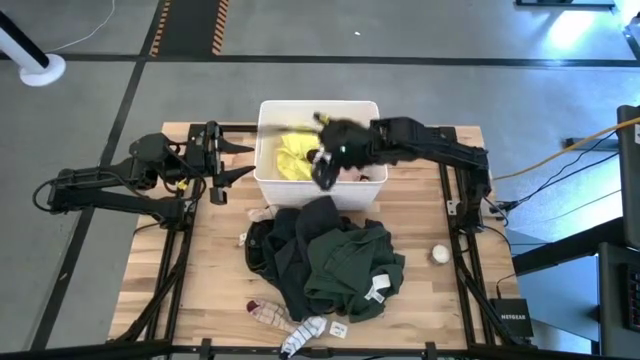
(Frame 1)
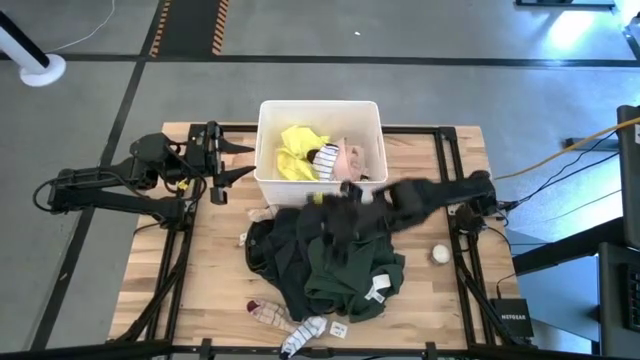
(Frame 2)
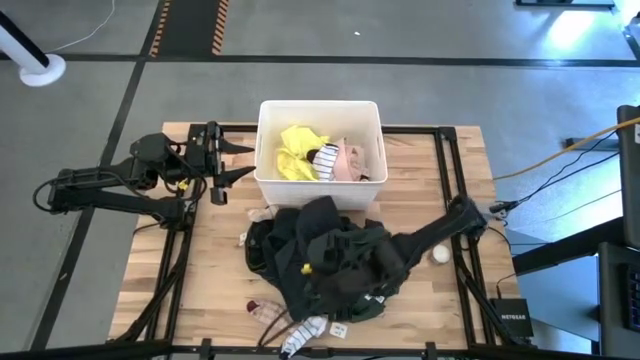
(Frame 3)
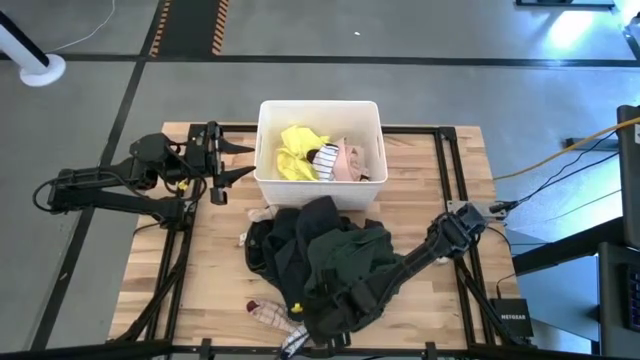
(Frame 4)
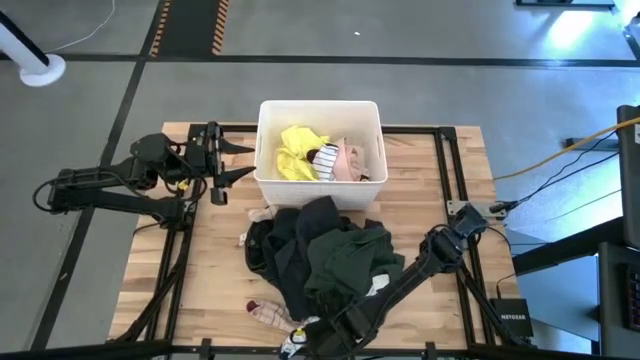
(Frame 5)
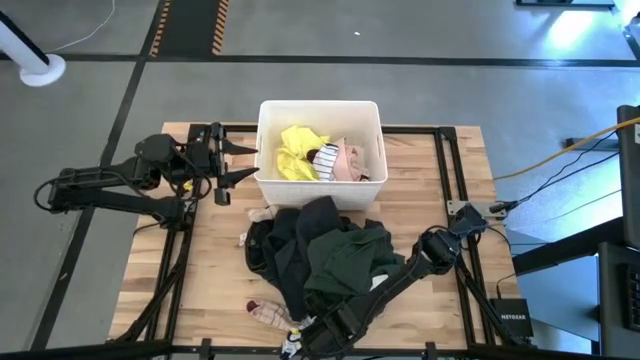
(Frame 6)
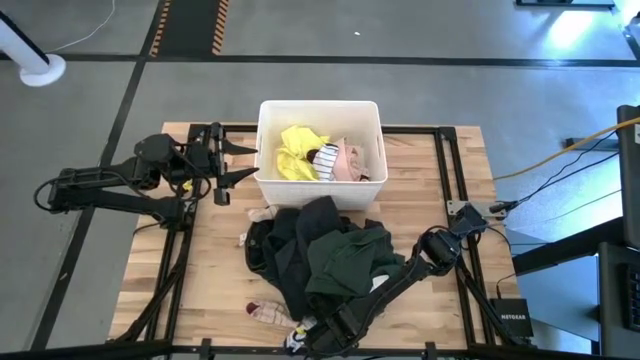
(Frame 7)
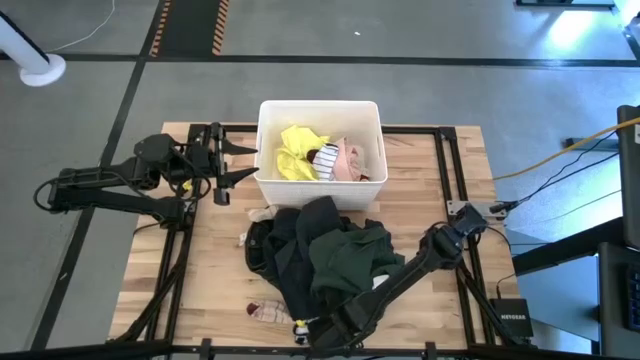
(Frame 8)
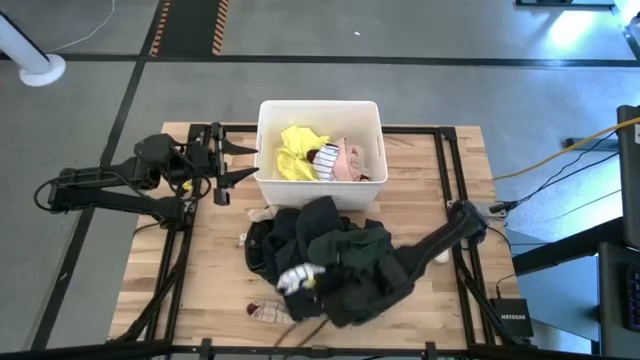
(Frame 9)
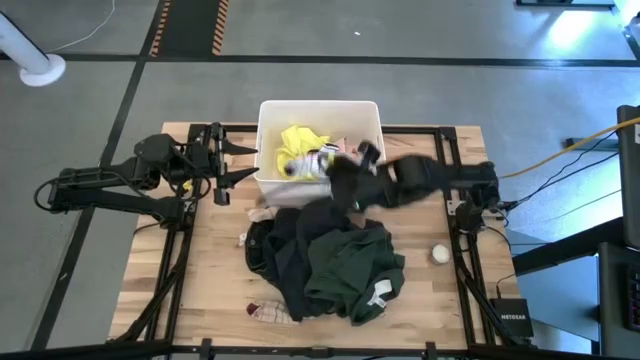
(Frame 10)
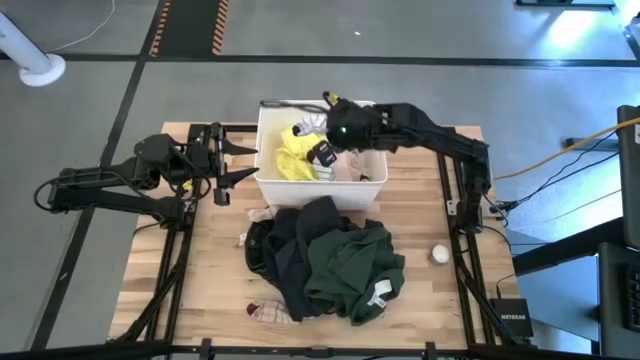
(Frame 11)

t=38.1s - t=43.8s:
Task: Sort clothes
Put the white sock into the white bin

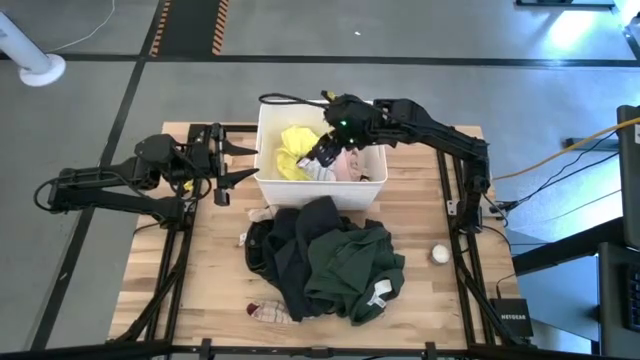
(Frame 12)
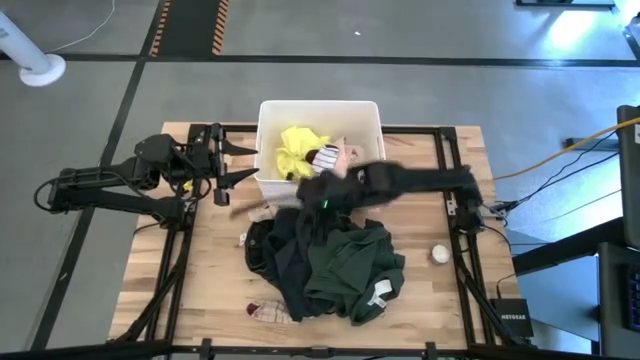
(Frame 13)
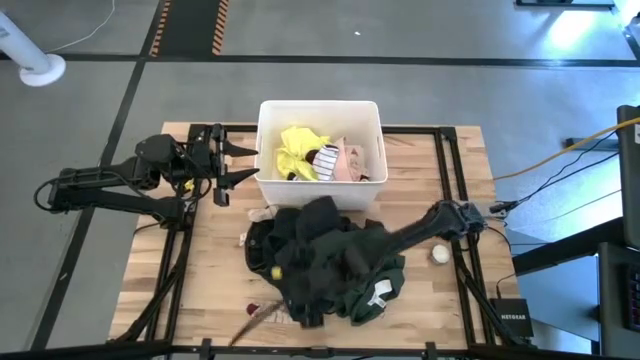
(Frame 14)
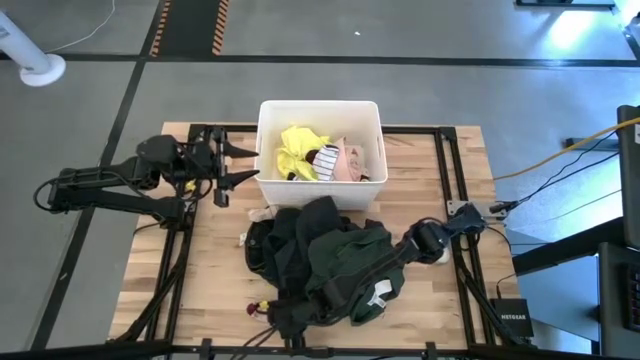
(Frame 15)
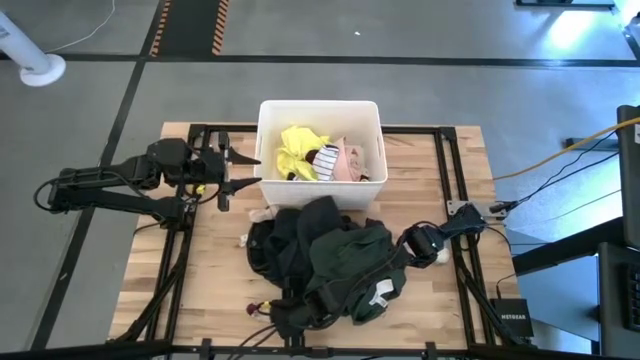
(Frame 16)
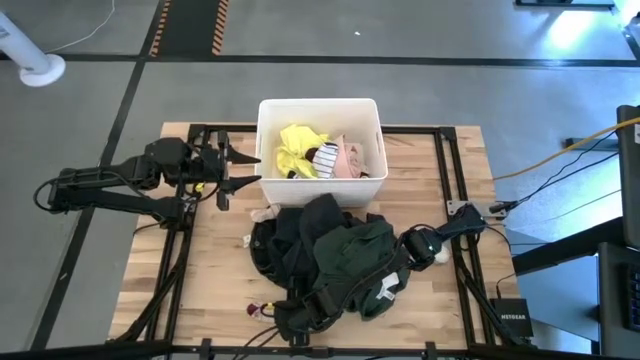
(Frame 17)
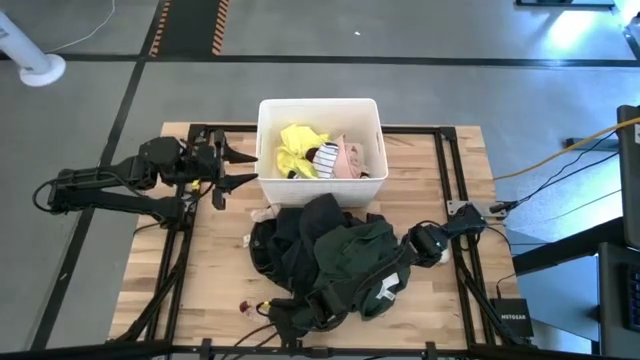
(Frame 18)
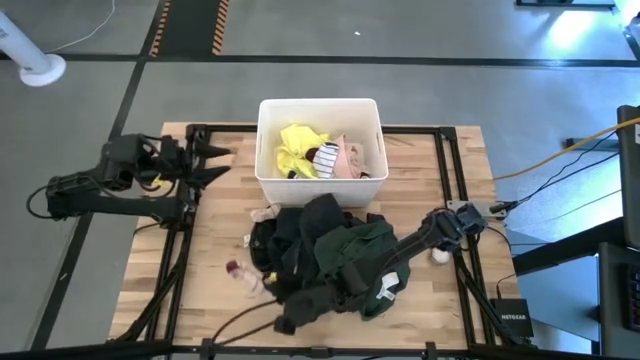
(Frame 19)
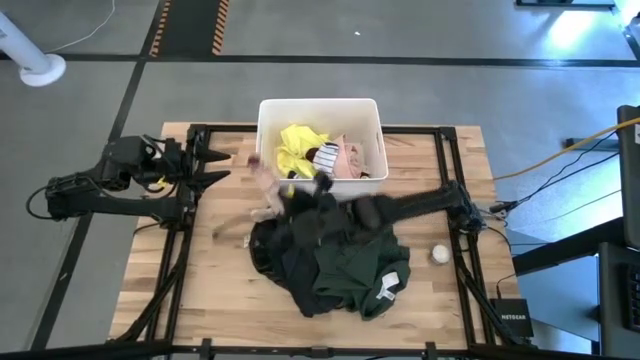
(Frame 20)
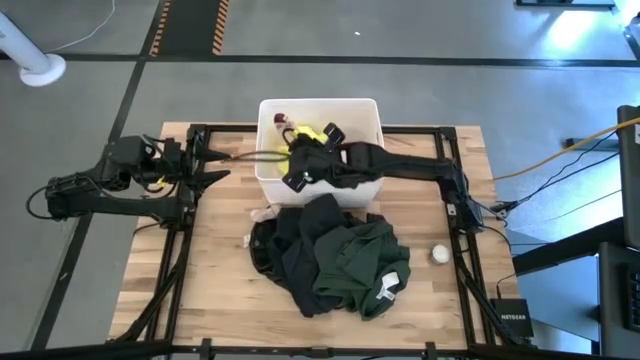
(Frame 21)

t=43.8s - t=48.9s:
Put the bottom red sock into the white bin

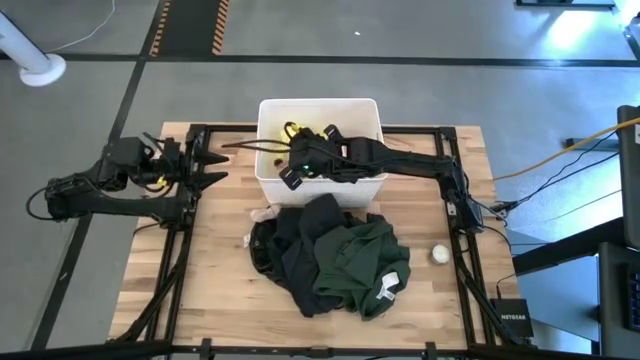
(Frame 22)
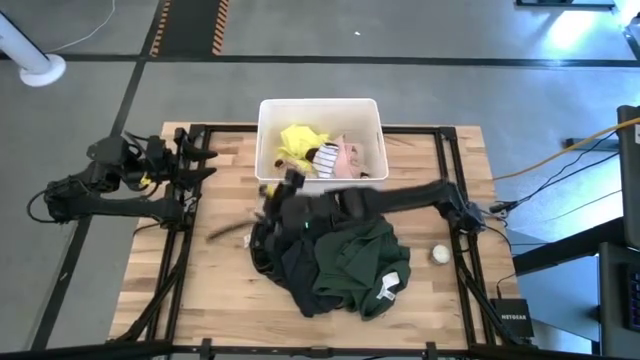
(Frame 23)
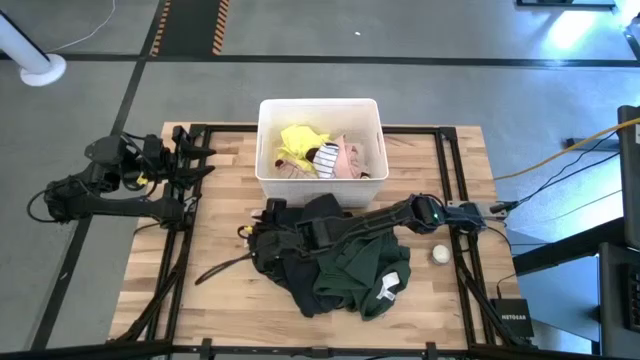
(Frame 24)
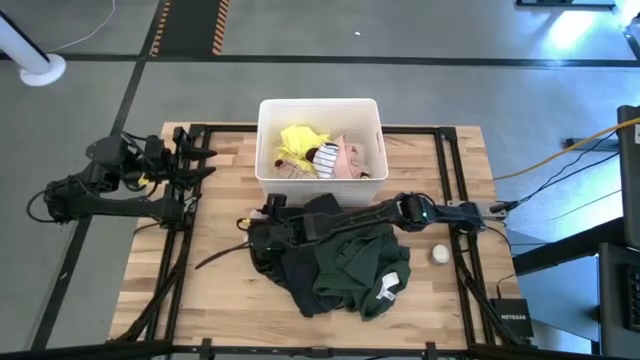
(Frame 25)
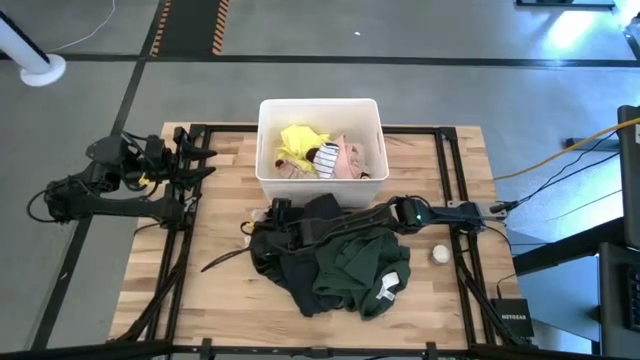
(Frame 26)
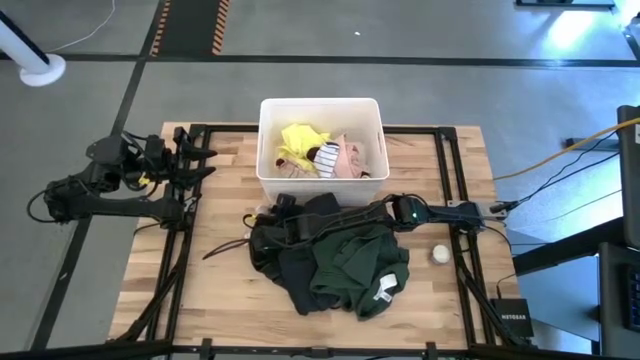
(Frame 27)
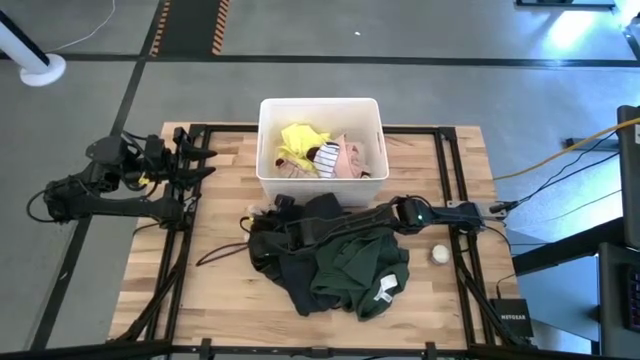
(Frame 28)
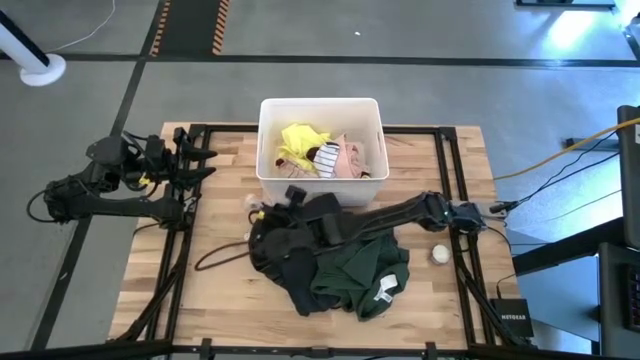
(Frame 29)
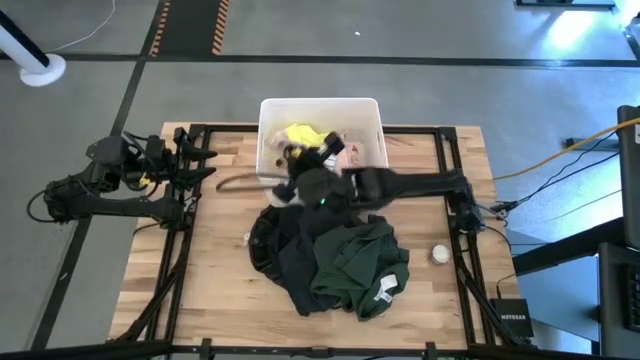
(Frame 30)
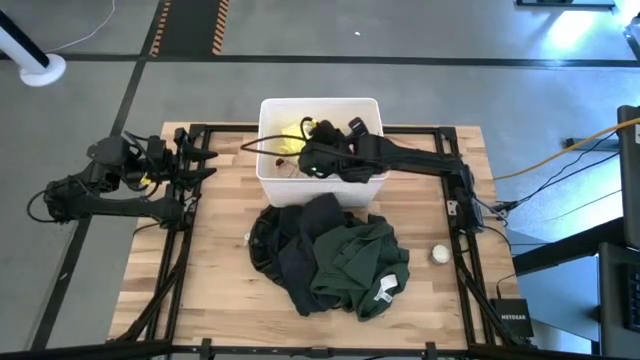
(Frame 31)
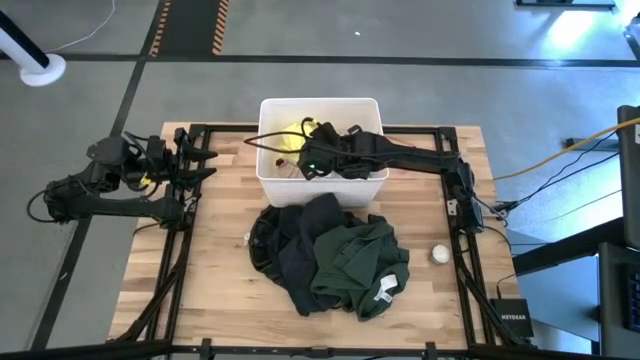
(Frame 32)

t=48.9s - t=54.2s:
Put the red sock into the white bin

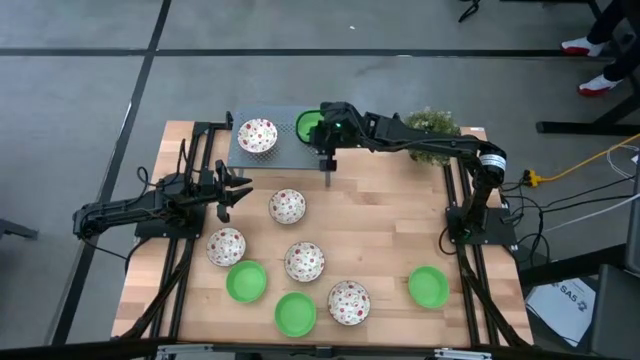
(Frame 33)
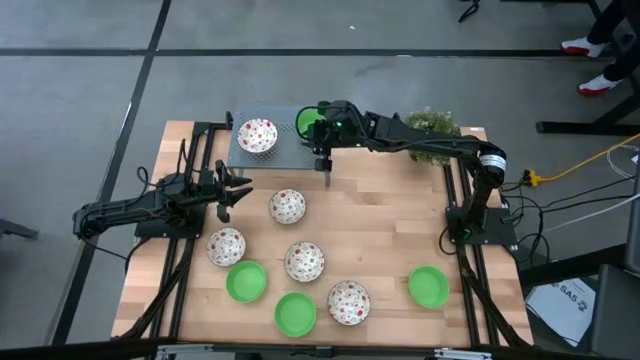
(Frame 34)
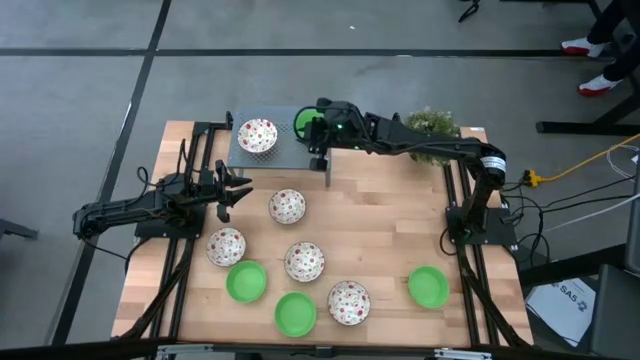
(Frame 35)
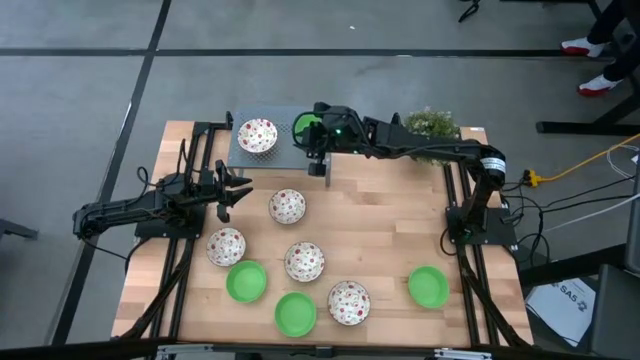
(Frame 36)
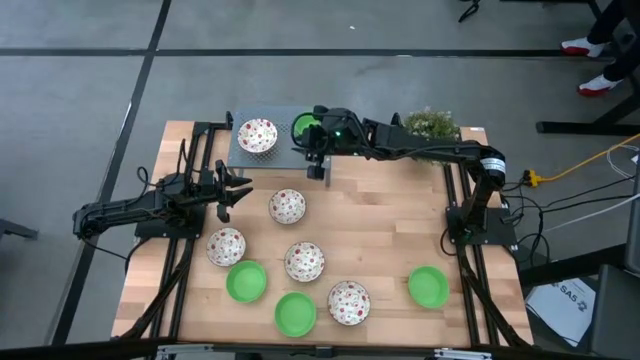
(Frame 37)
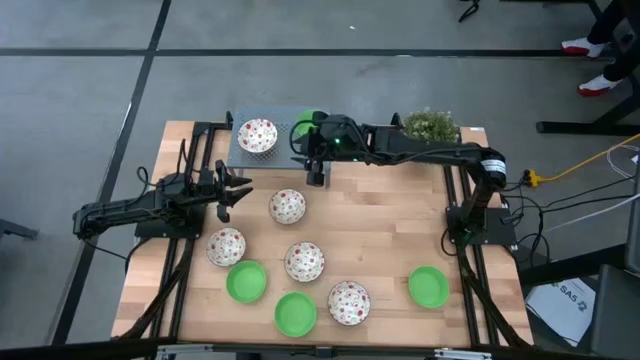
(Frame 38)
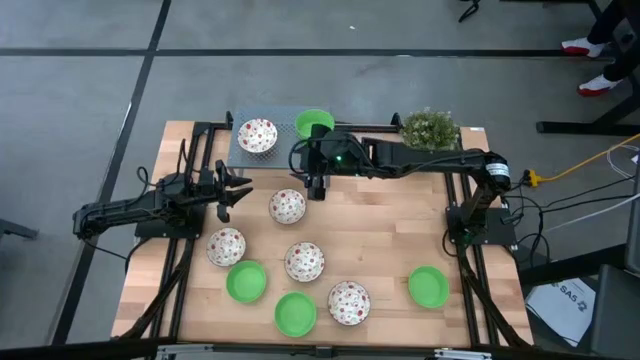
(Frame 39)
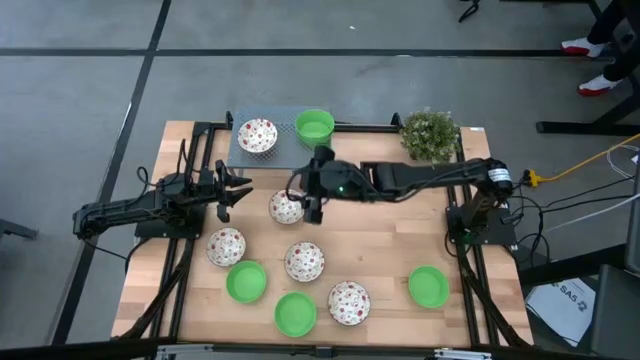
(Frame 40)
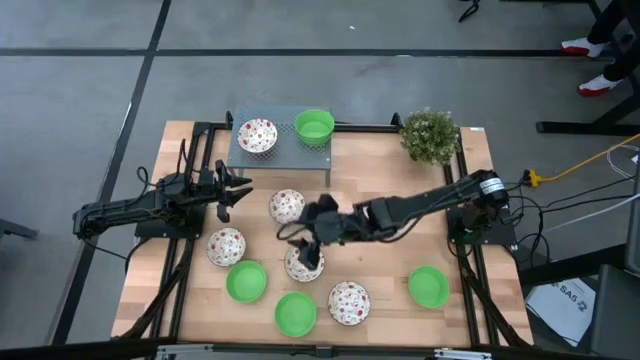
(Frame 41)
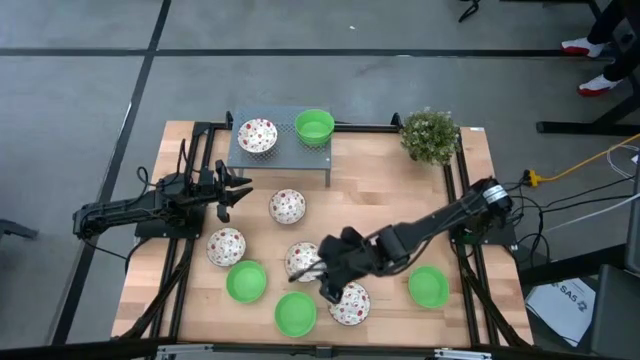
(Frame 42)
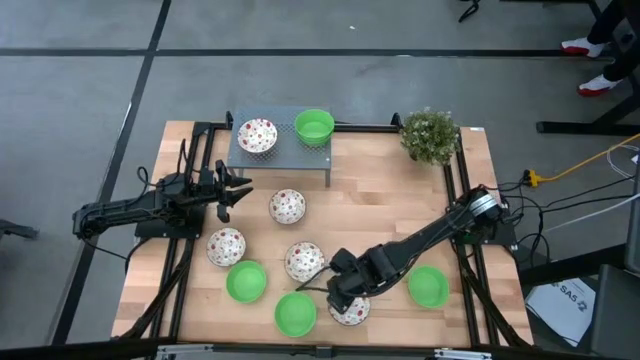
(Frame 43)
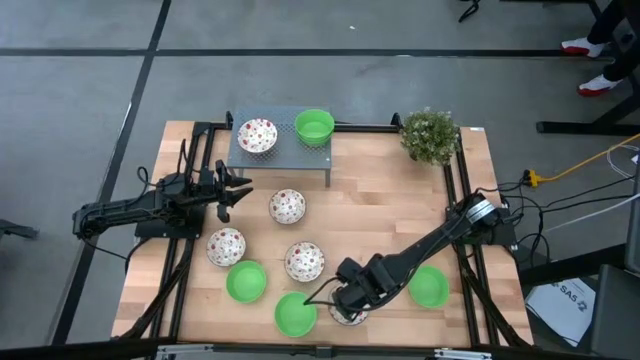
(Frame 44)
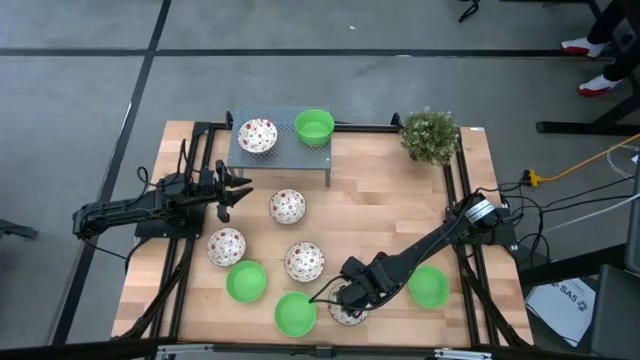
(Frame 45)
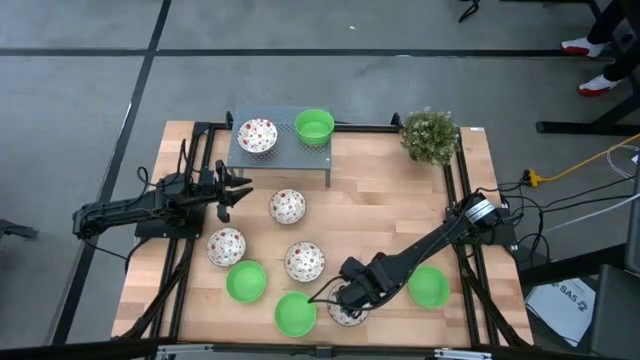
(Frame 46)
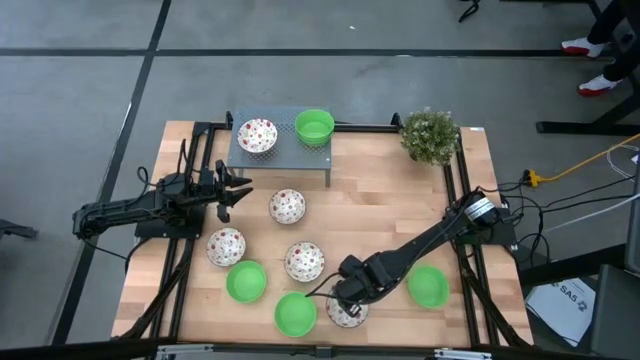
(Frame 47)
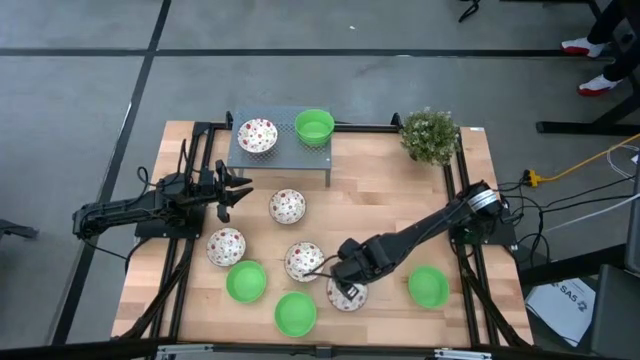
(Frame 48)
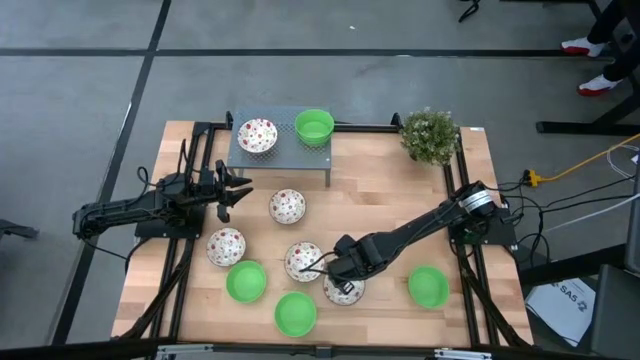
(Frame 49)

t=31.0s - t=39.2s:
Task: Pick & Place Mini bowls
Stack the white bowl on top of the white bowl on the shelf
